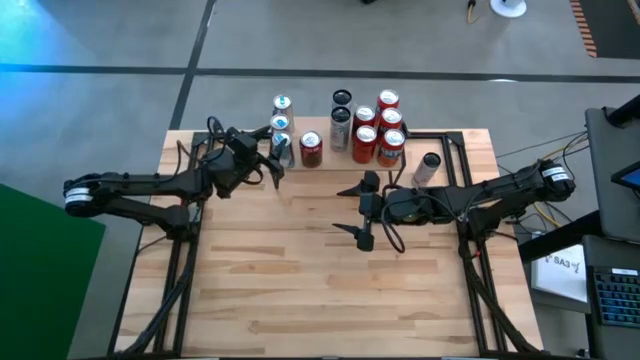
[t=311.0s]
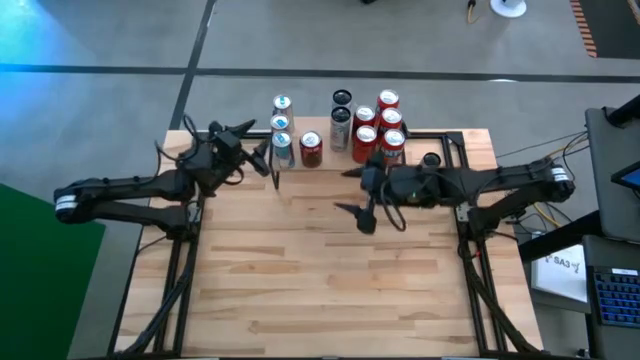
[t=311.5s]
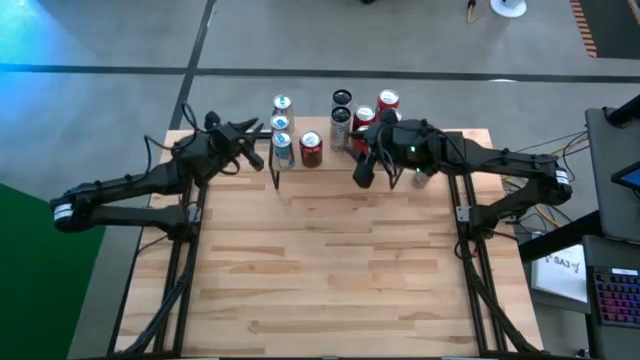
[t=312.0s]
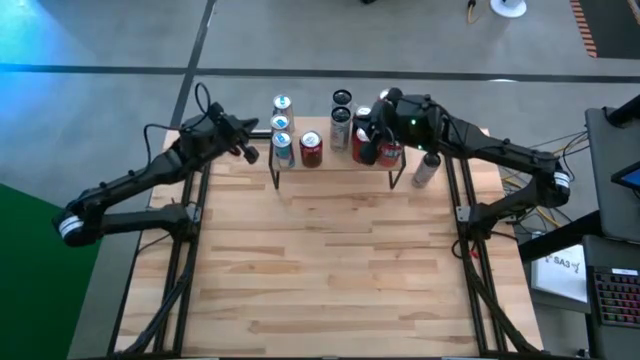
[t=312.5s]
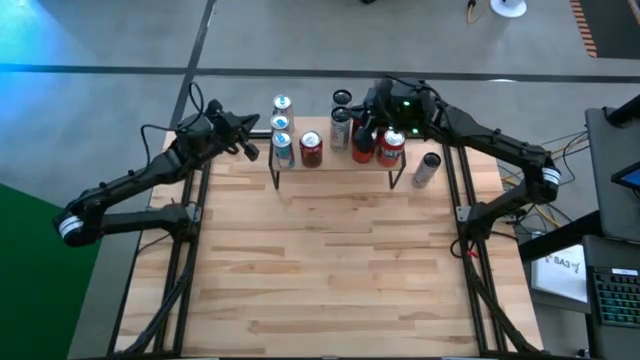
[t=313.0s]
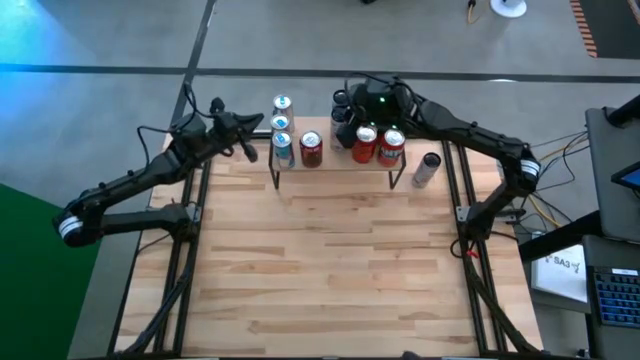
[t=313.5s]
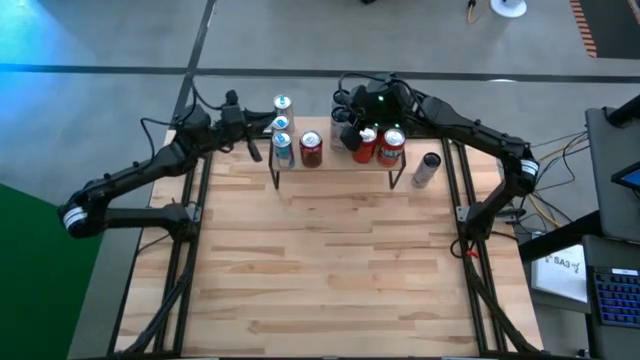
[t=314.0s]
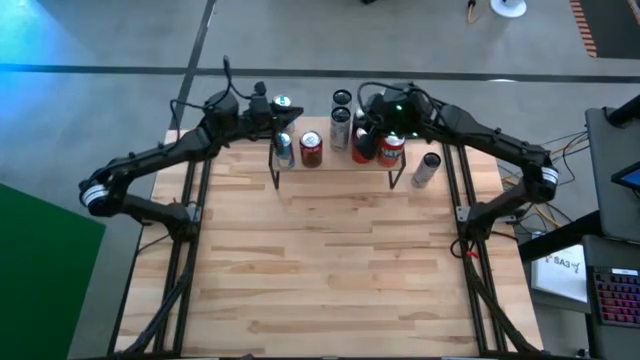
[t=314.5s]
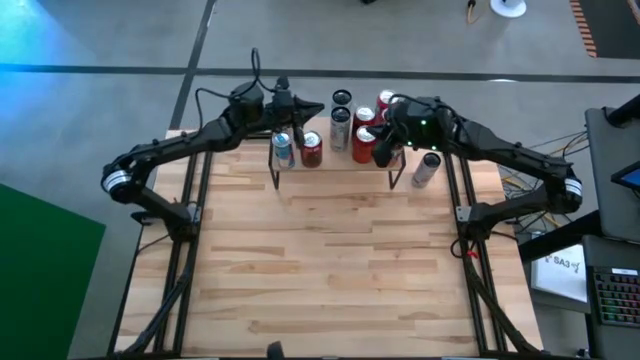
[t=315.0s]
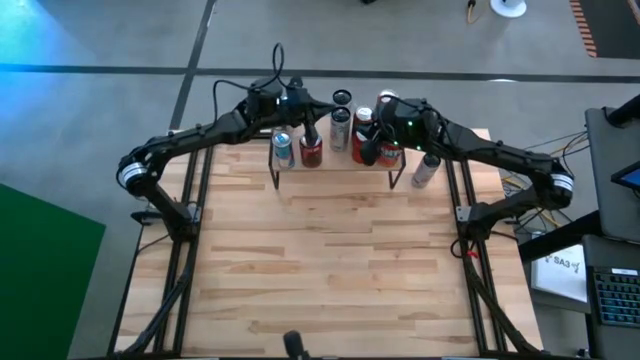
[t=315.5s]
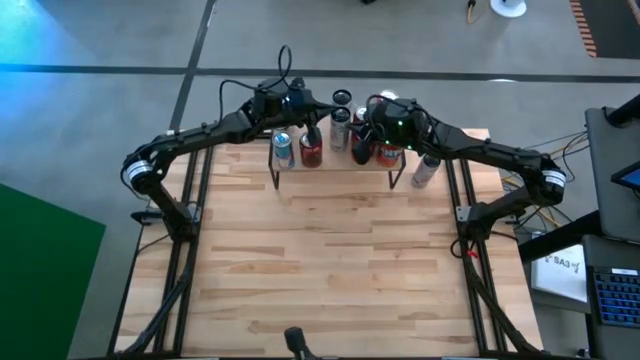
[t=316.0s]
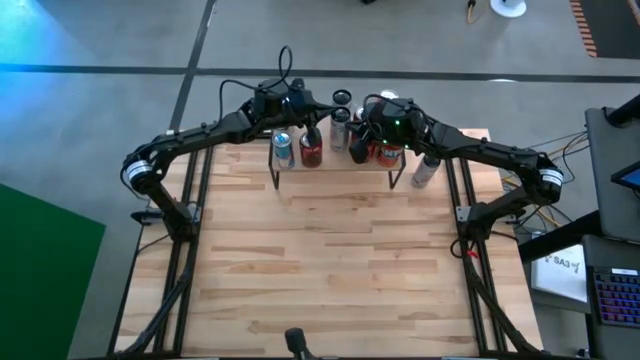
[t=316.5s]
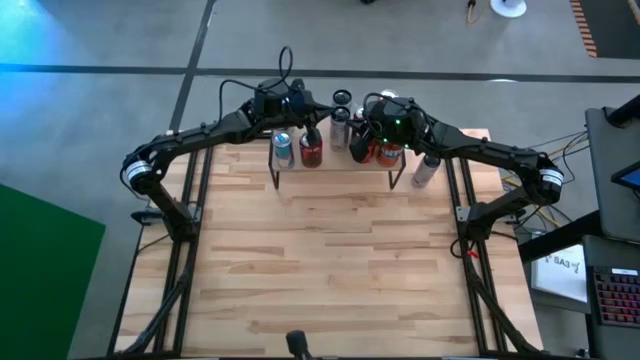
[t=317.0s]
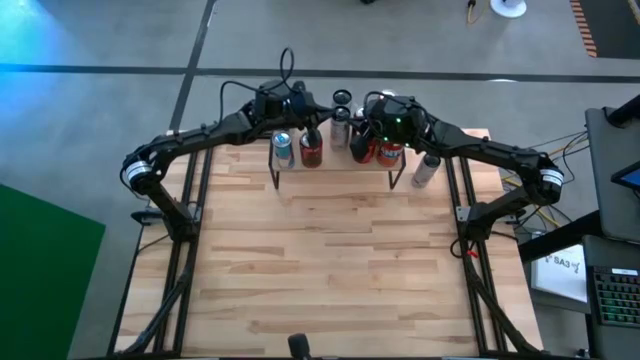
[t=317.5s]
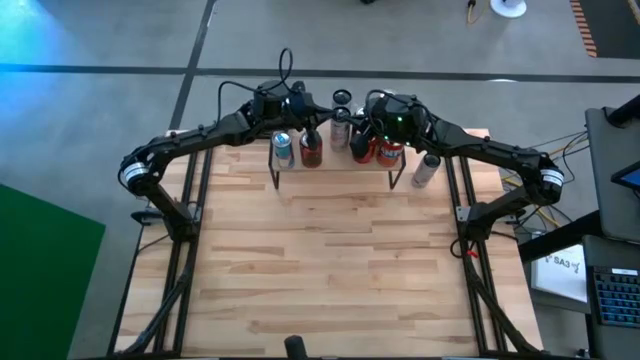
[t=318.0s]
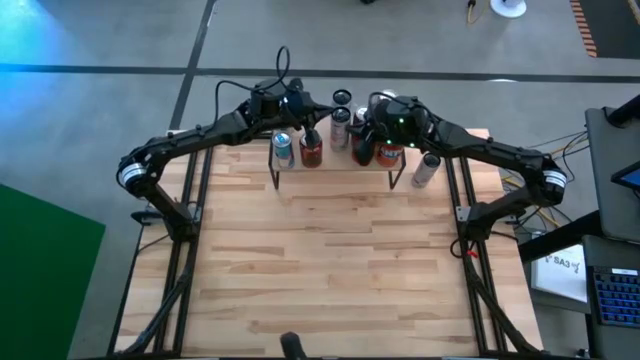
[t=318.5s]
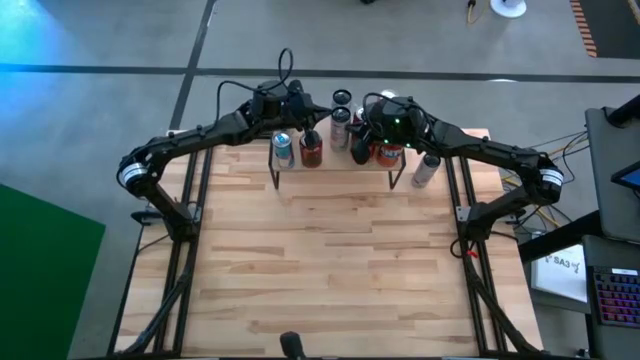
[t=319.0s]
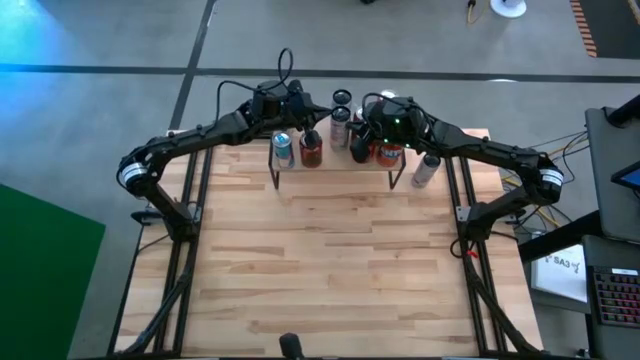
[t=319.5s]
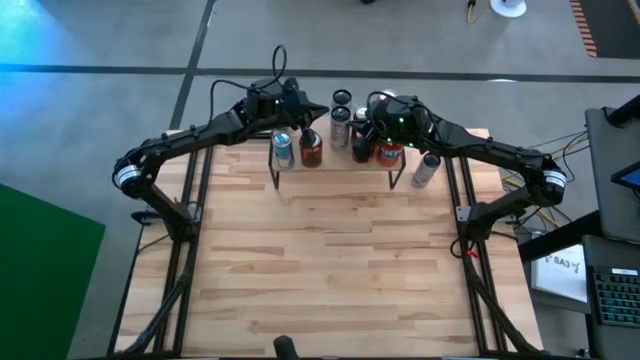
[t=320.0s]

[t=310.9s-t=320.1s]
Task: Place canned beverage on shelf
Adjust the white blue soda can from the shelf

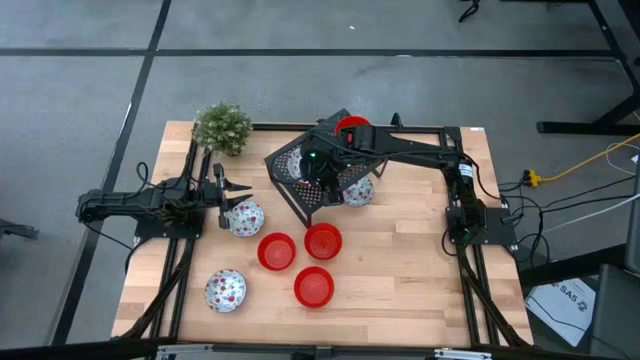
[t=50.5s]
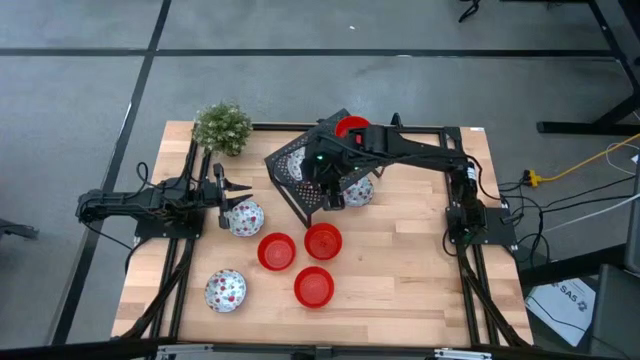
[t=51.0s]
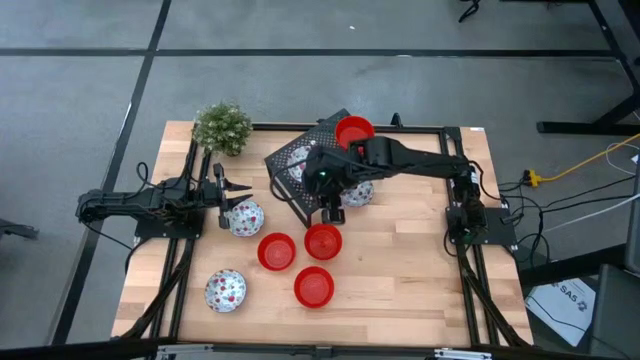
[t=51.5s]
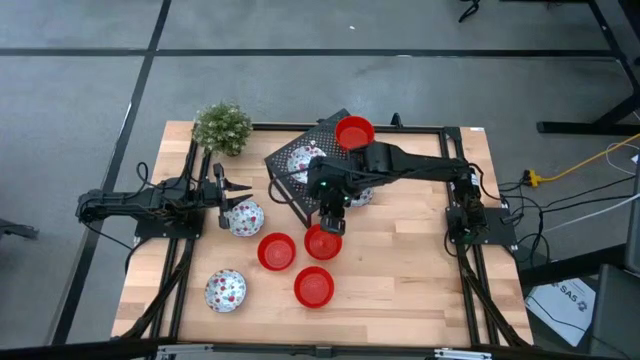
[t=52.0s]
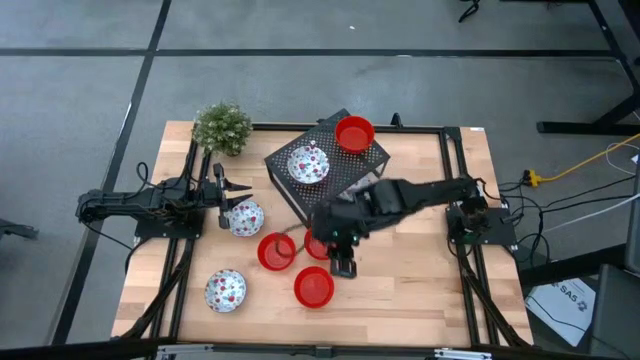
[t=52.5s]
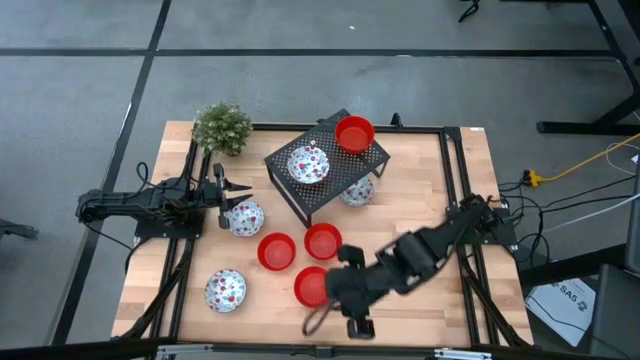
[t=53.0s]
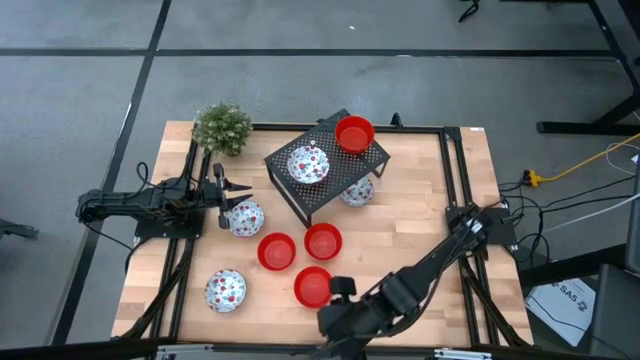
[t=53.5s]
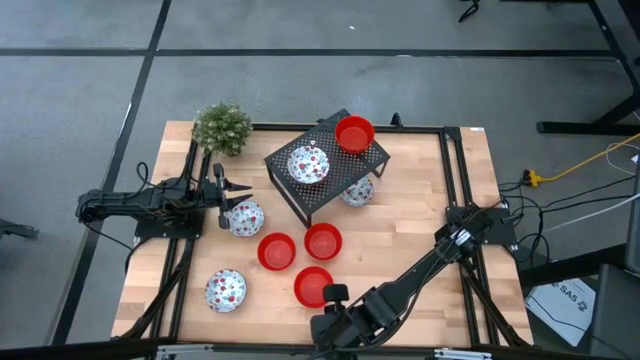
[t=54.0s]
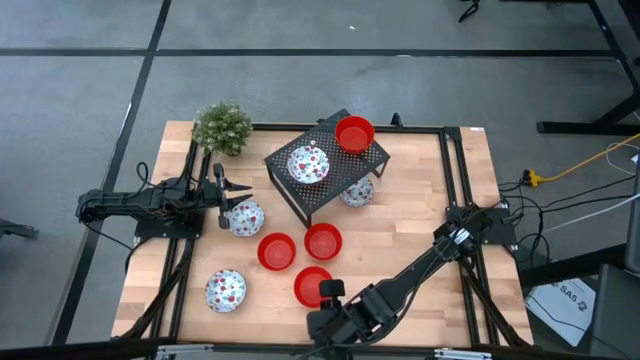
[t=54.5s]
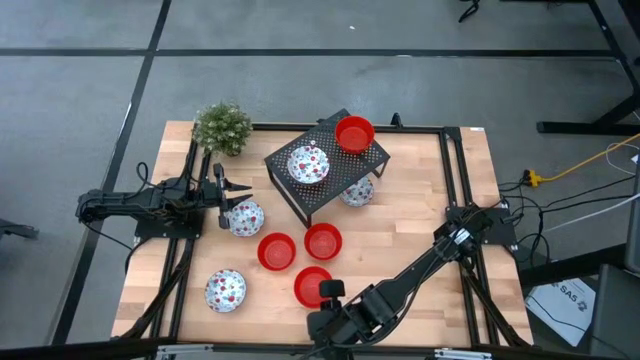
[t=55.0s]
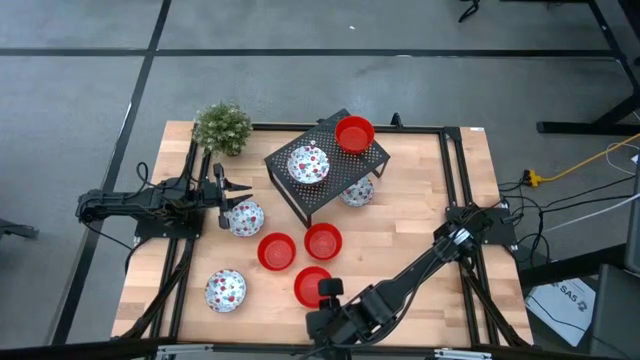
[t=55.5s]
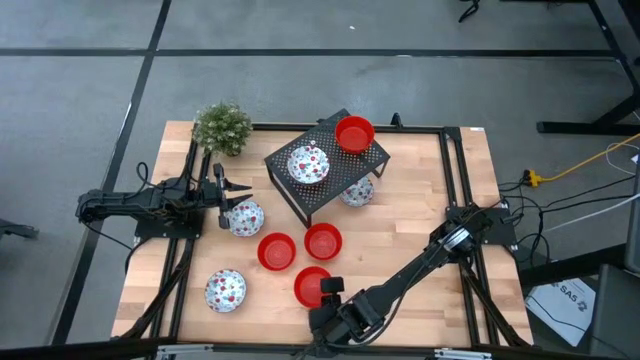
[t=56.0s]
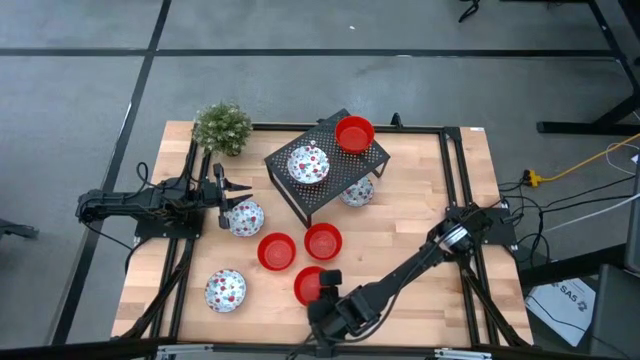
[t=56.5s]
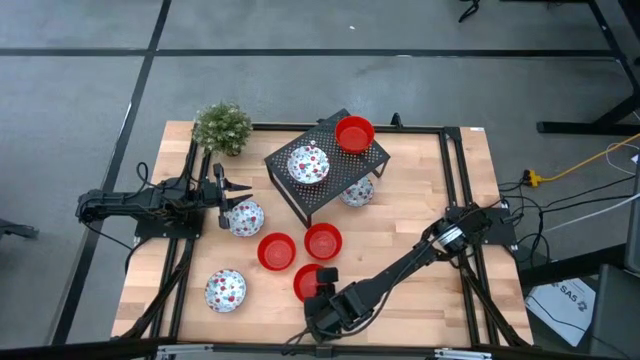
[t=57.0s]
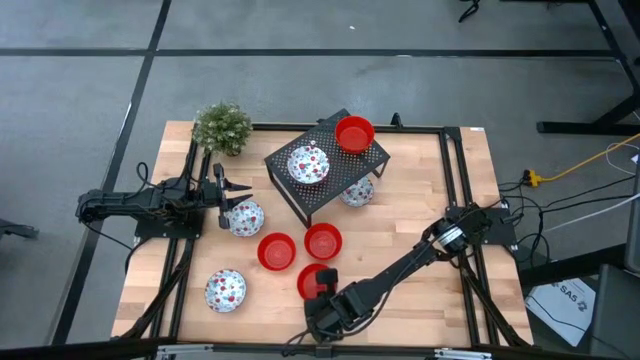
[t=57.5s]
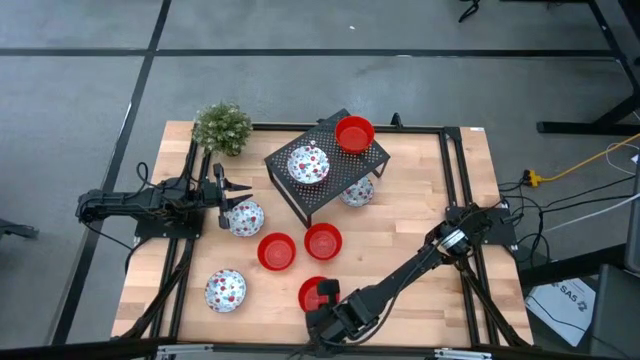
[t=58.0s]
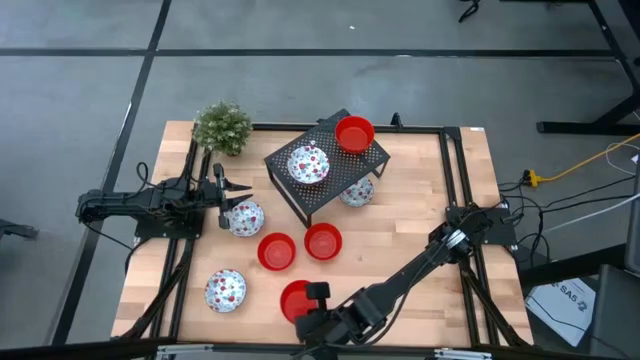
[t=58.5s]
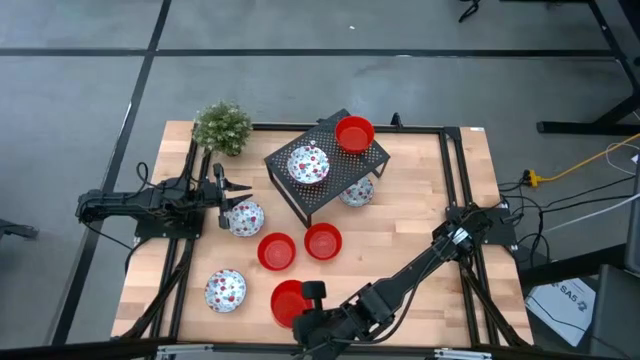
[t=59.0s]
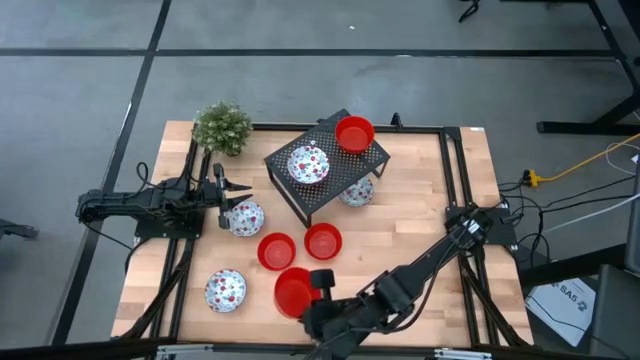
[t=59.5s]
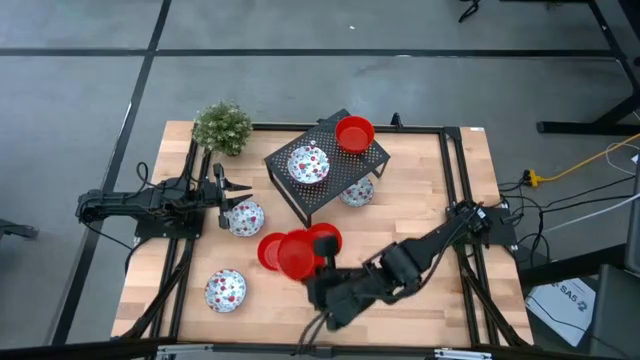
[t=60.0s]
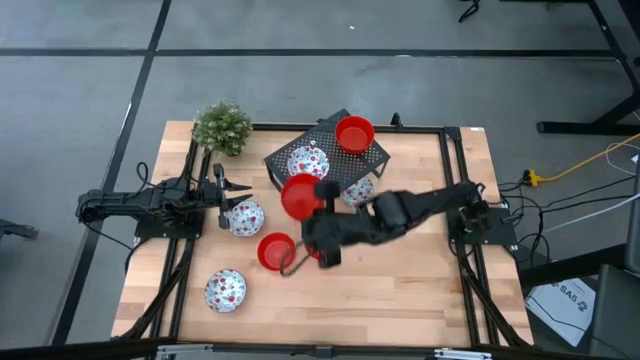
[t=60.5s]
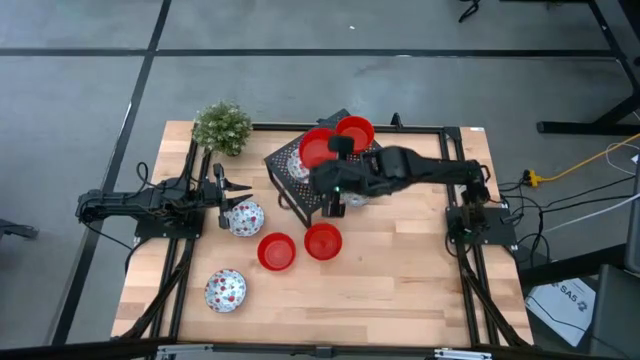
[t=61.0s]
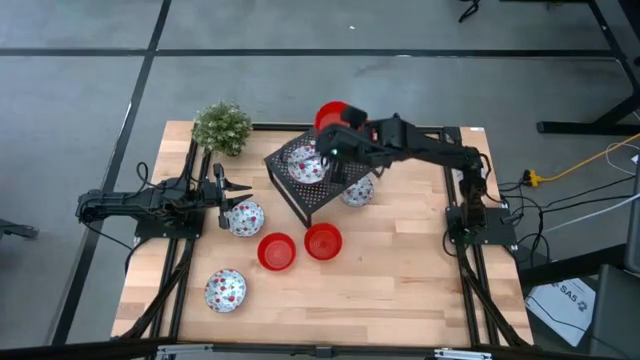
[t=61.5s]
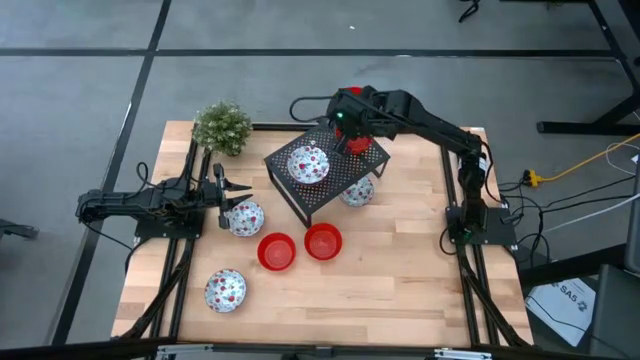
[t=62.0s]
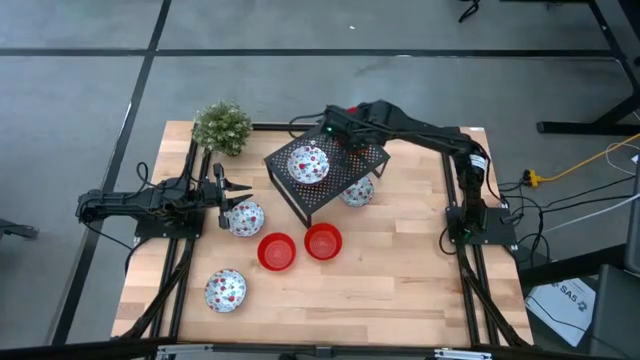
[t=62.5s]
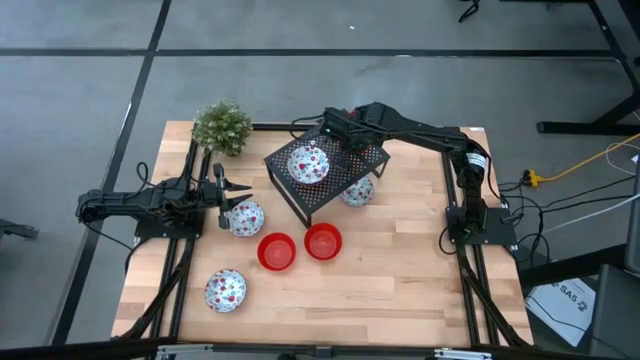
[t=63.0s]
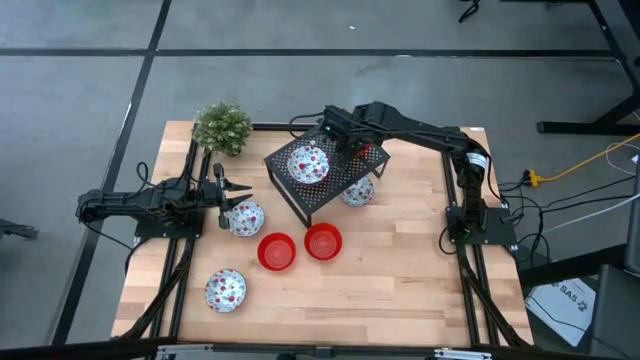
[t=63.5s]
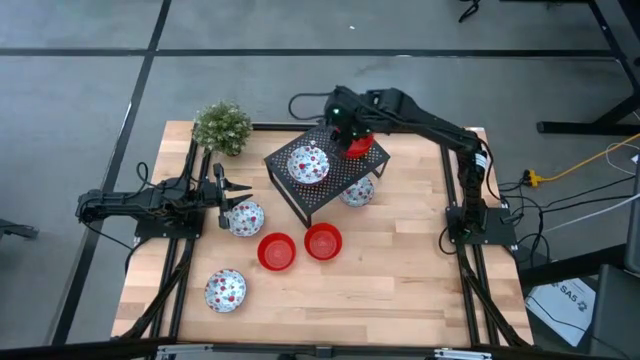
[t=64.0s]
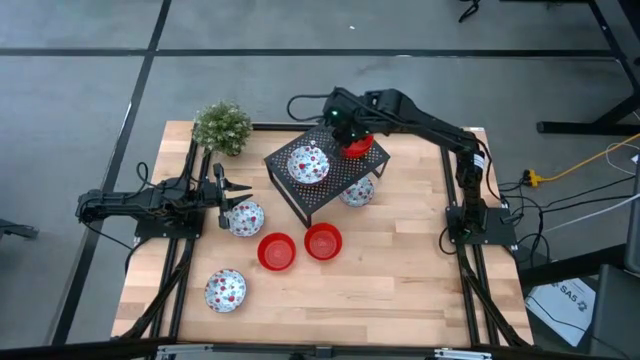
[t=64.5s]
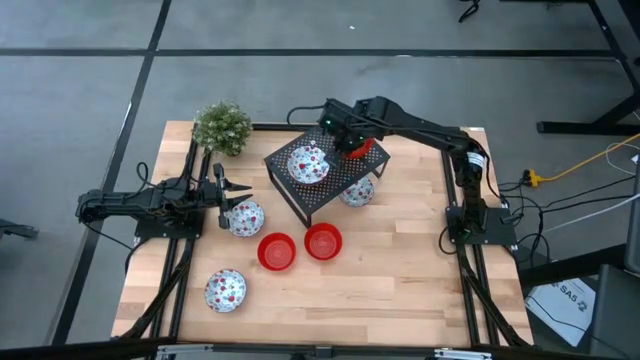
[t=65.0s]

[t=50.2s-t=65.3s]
Task: Pick & Place Mini bowls
Stack the red bowl on the red bowl on the shelf
